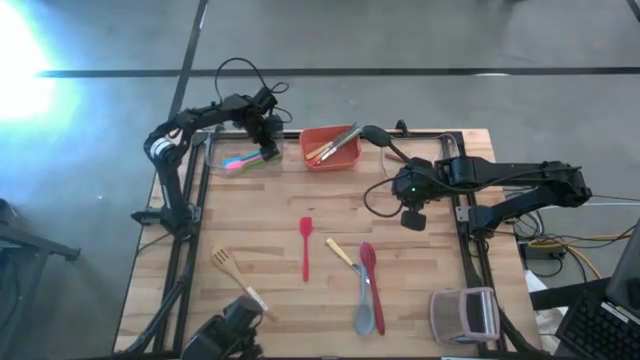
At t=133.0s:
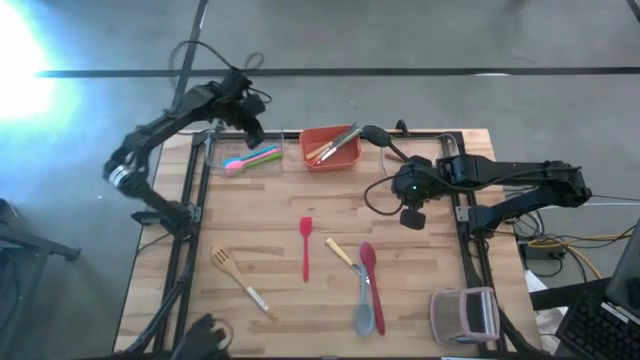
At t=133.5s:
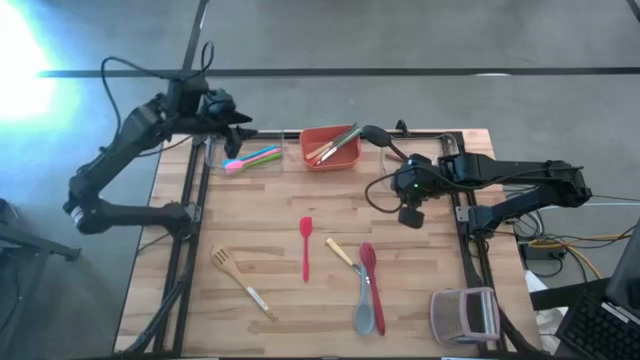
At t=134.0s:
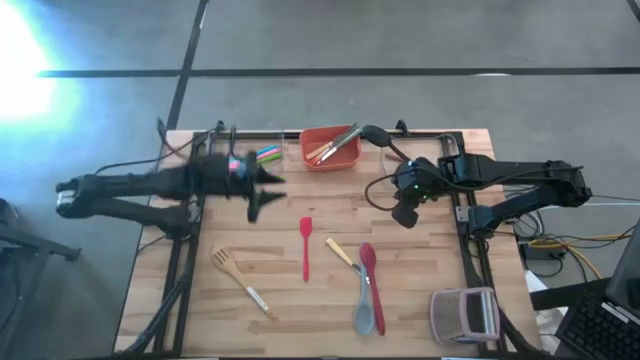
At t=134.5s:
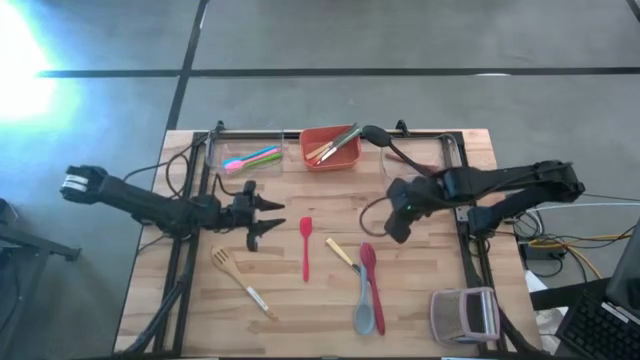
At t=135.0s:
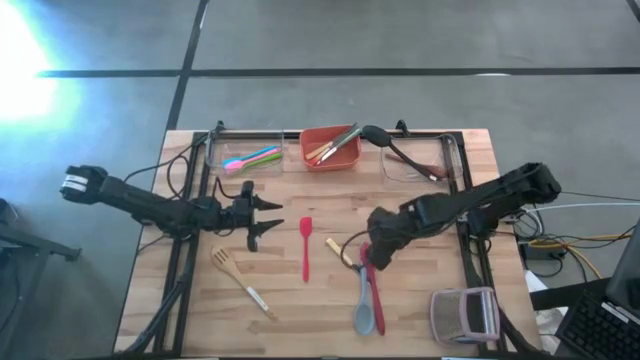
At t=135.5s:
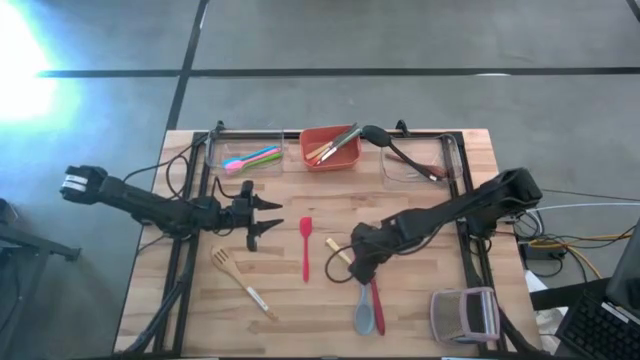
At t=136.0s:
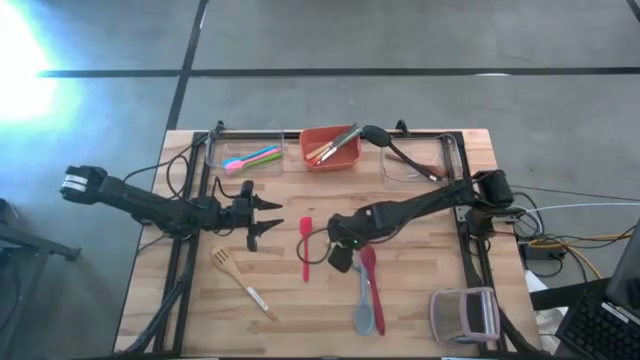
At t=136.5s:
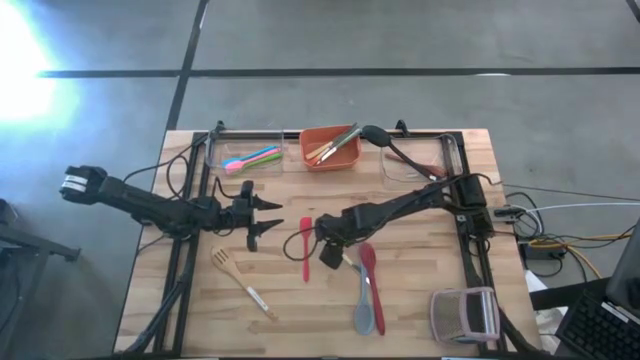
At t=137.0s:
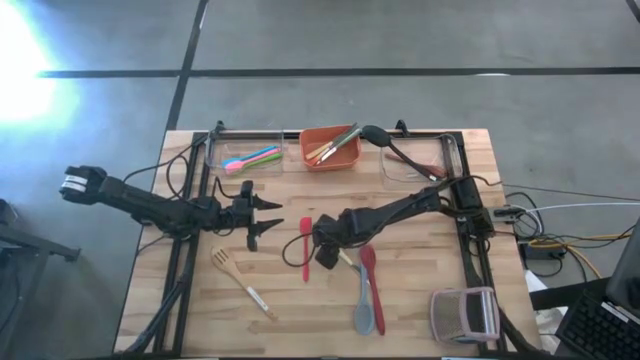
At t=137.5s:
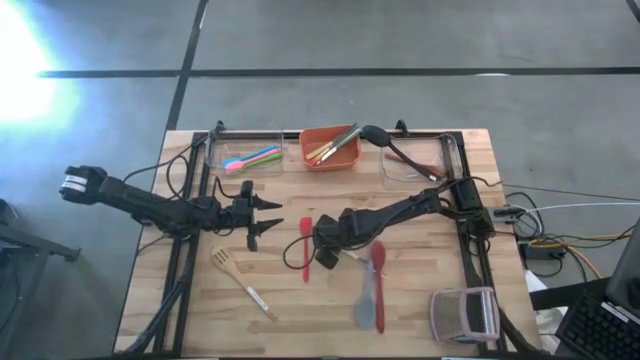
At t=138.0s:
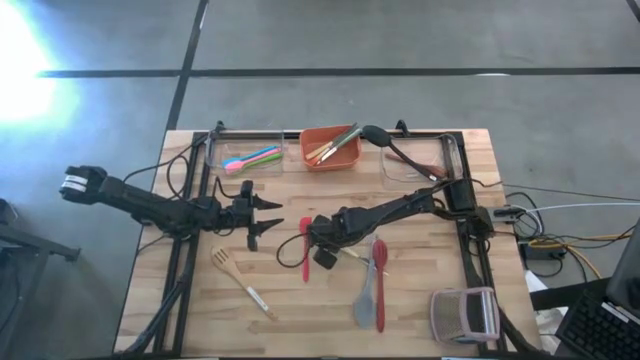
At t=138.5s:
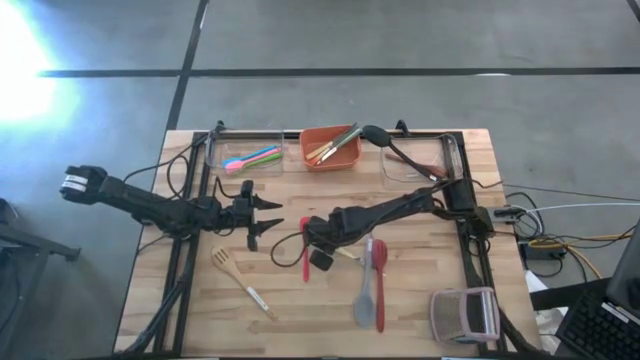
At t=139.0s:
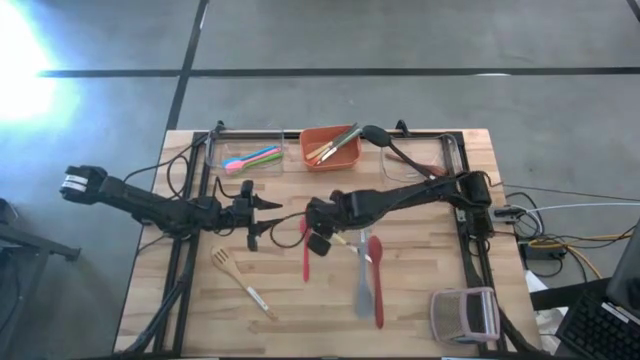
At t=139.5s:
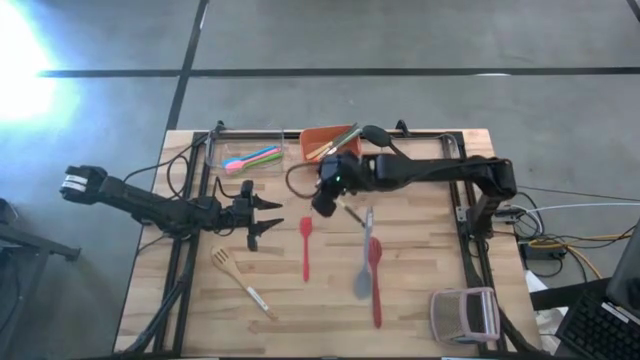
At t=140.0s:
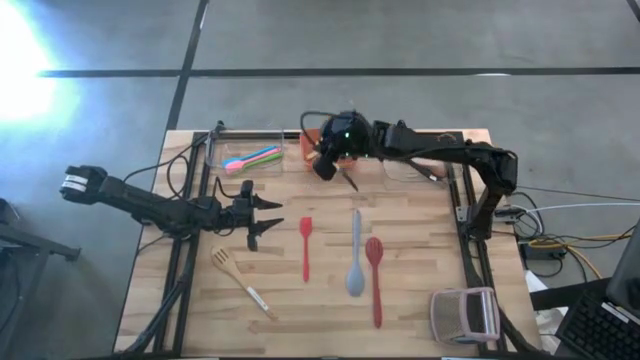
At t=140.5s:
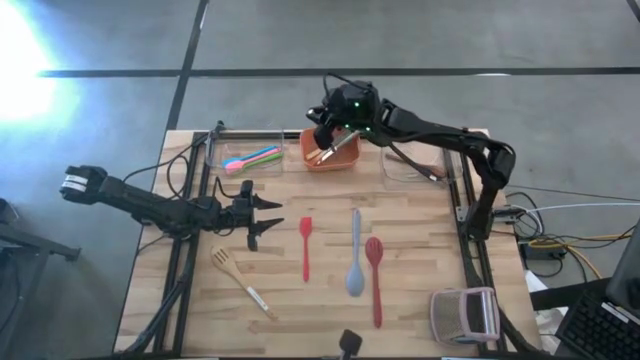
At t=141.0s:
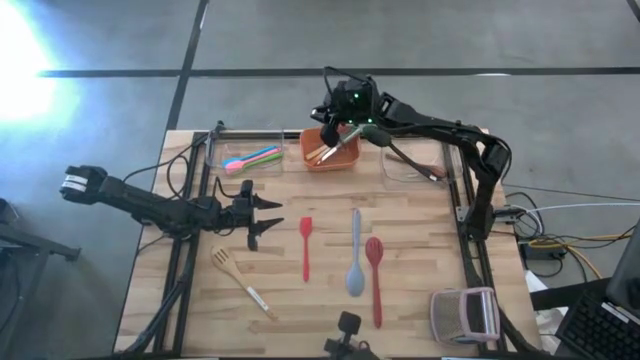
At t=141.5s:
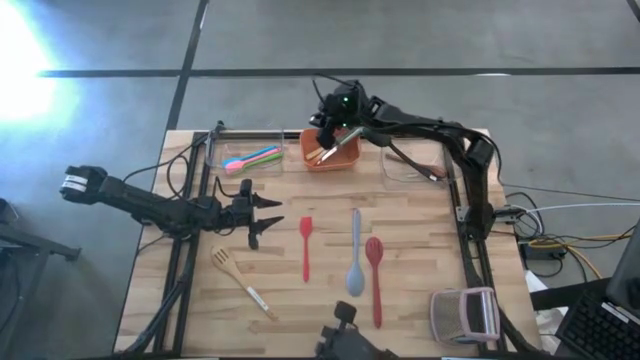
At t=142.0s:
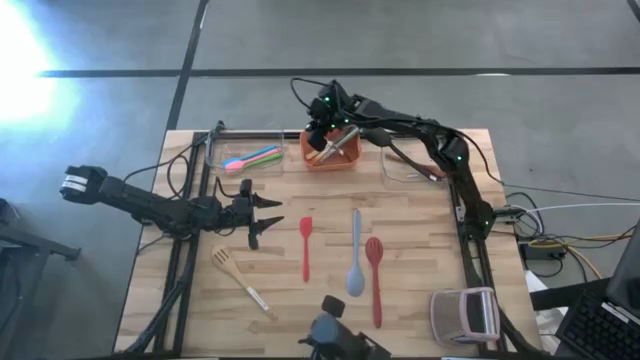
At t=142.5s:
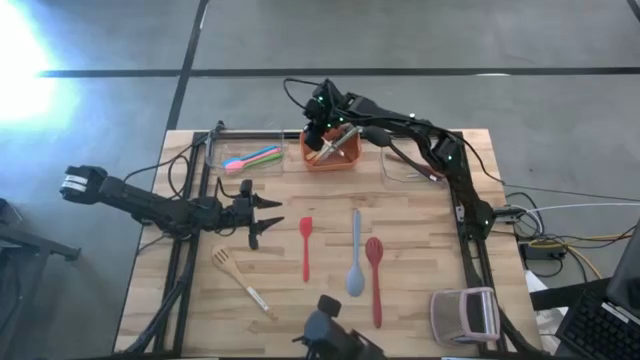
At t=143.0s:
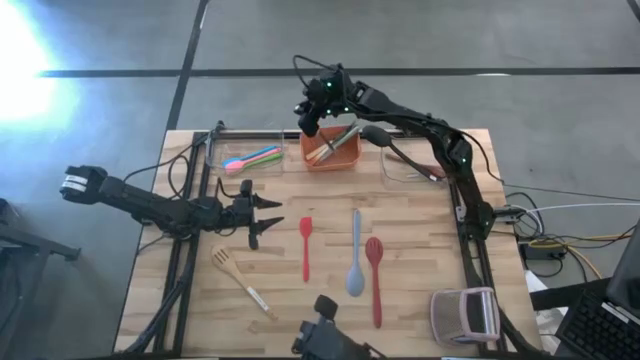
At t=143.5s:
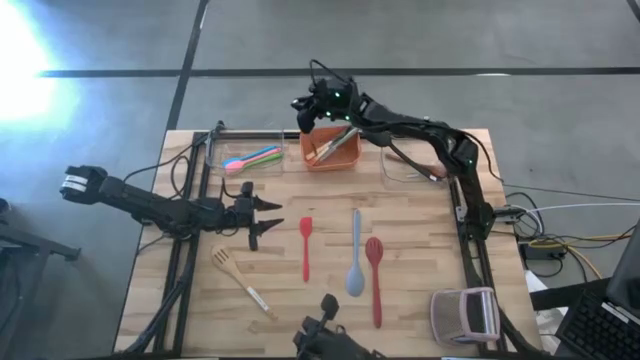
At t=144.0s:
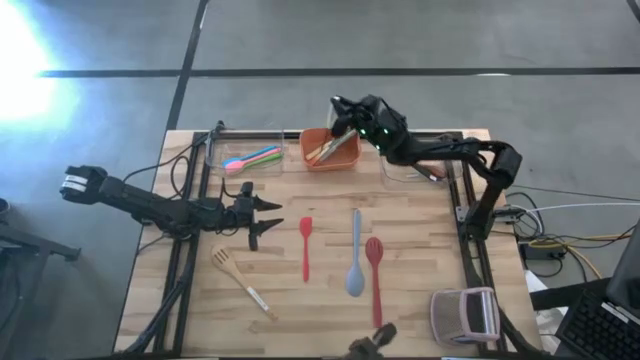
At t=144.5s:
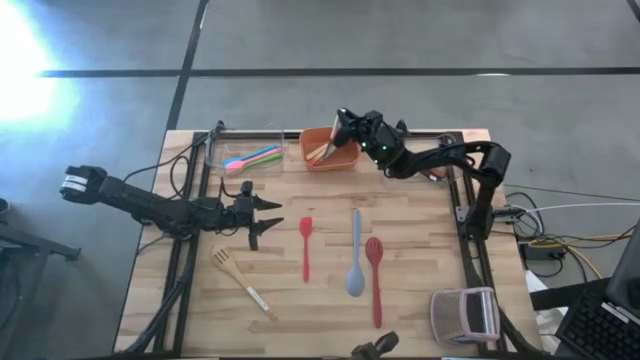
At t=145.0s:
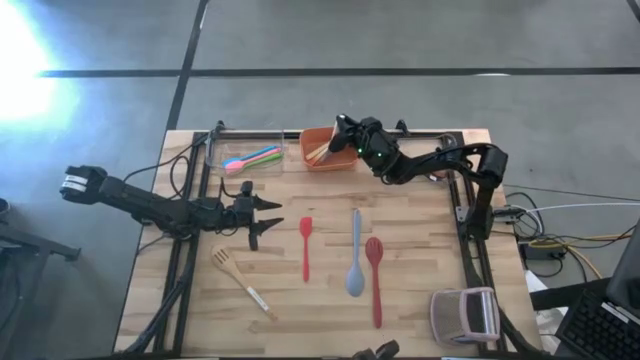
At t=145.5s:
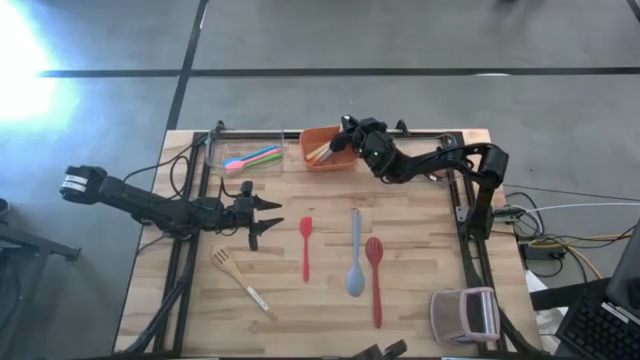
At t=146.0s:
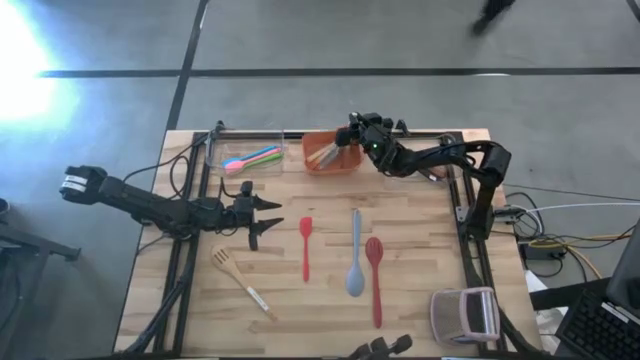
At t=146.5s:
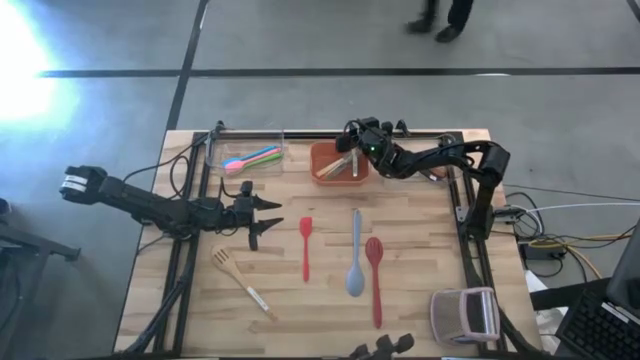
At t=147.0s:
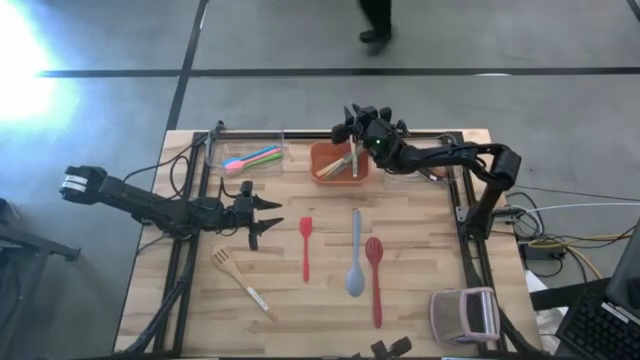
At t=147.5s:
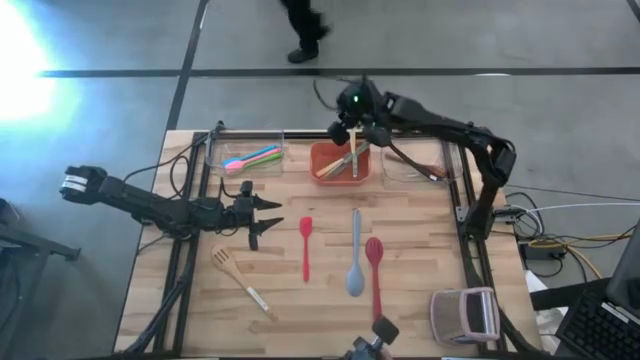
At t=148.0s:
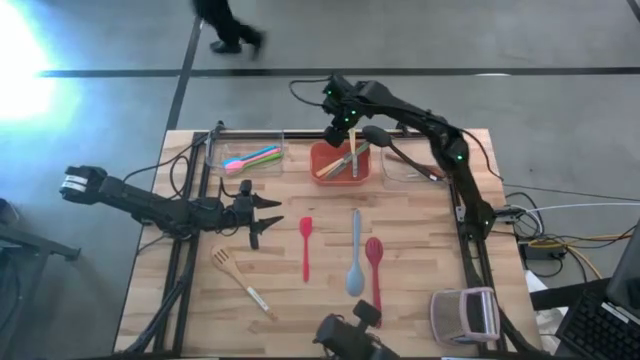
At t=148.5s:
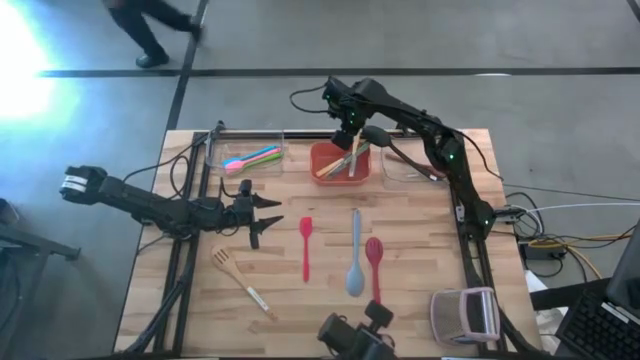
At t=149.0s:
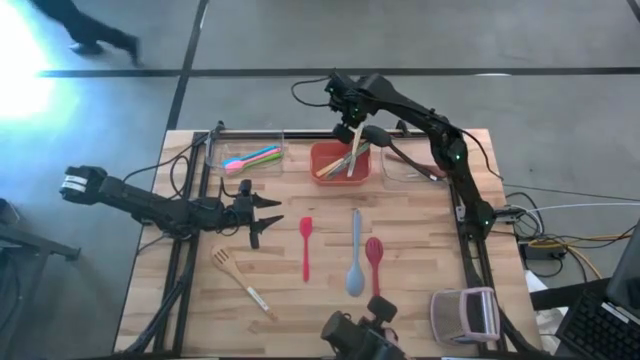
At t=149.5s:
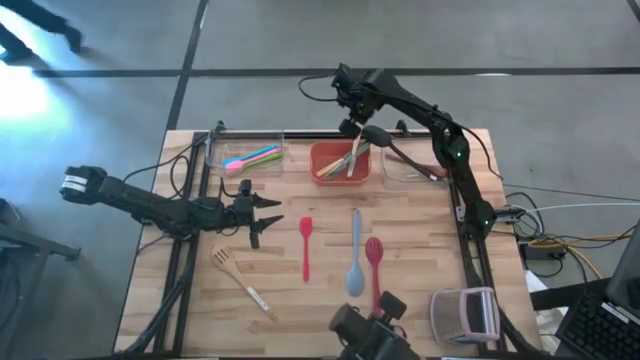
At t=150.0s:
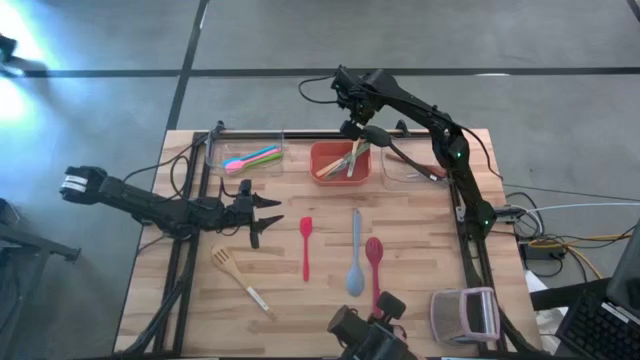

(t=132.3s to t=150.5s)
Task: Pick & Place Kitchen Items
Put the yellow knife into the orange bin

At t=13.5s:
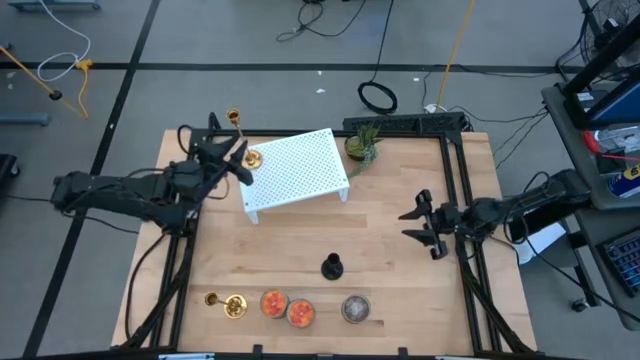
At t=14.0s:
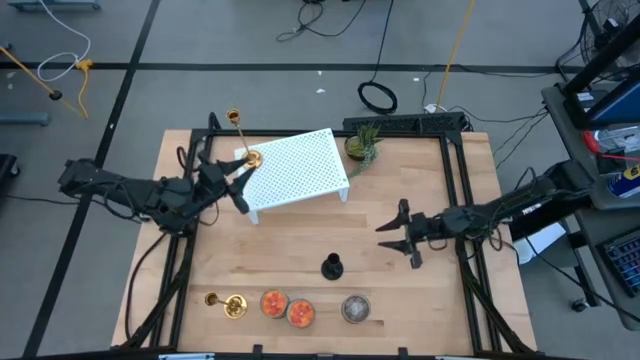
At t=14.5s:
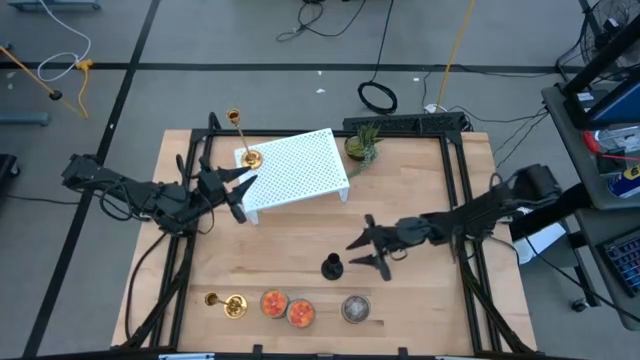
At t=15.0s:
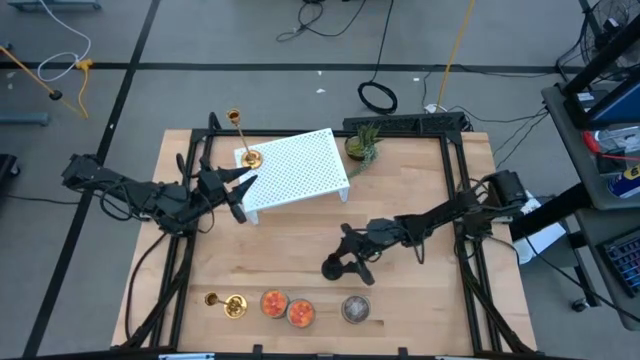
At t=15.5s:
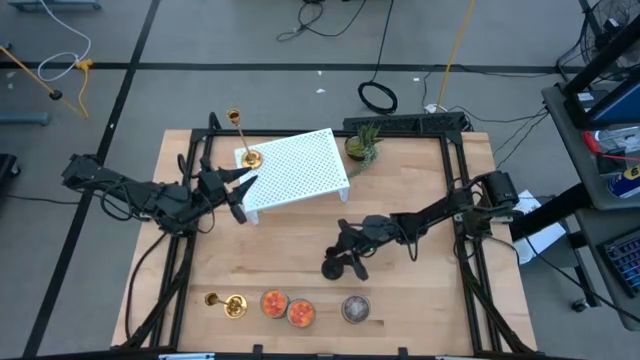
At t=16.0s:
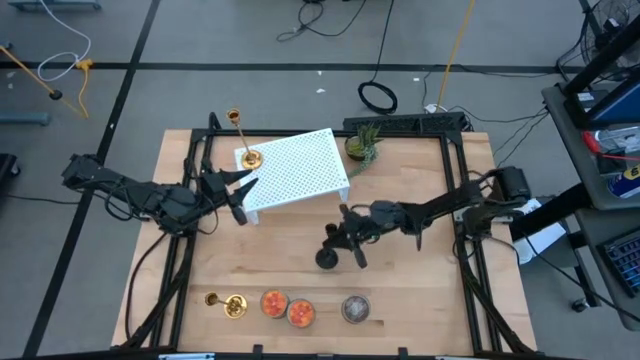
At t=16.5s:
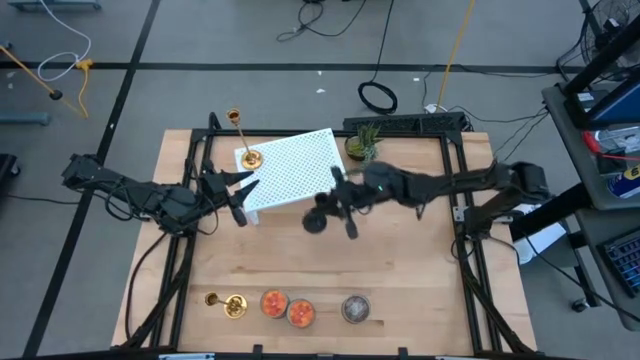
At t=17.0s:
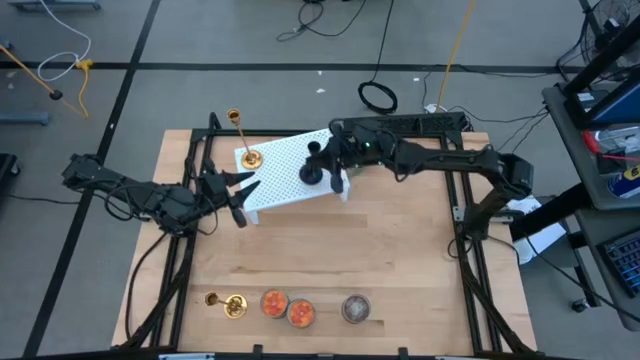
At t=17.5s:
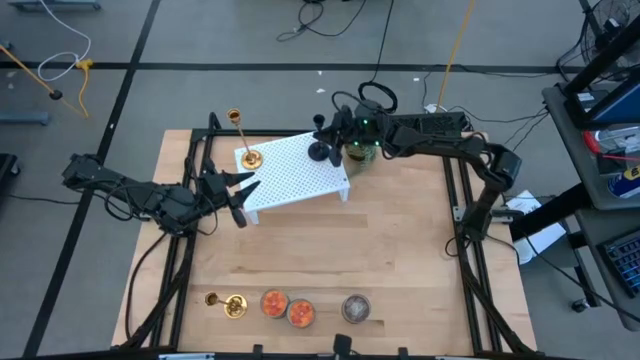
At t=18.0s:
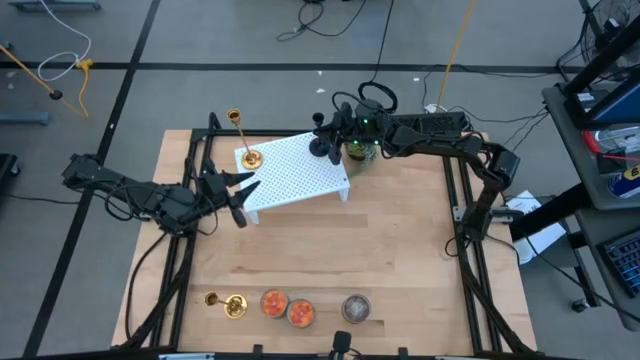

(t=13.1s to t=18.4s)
Task: Pick & Place candle stick holders
Put the black candle holder on the shelf
